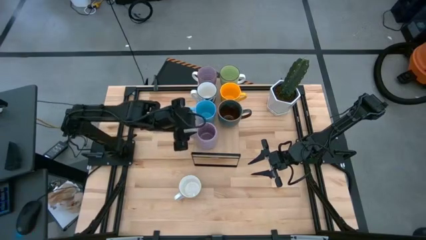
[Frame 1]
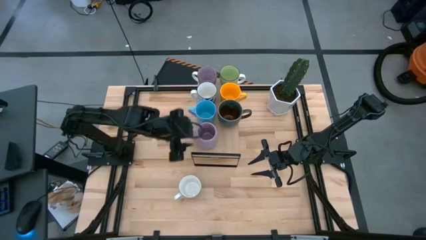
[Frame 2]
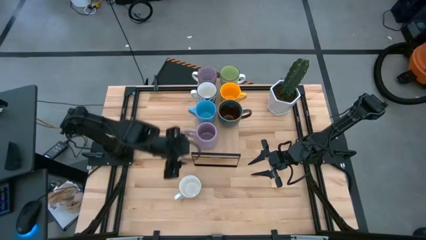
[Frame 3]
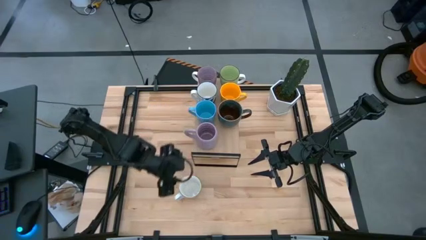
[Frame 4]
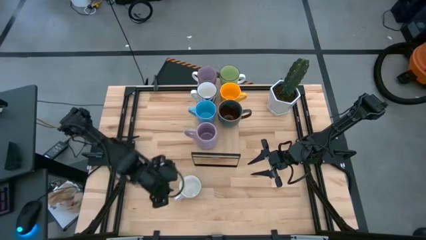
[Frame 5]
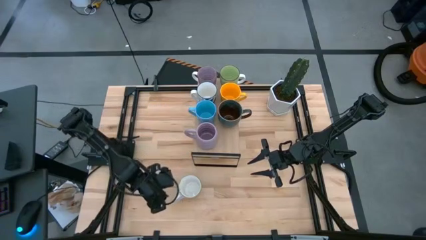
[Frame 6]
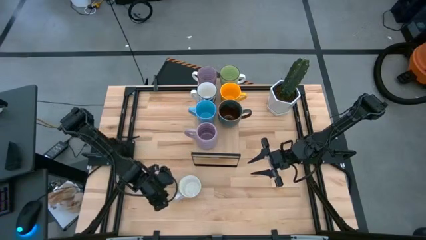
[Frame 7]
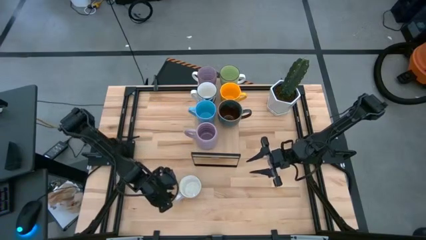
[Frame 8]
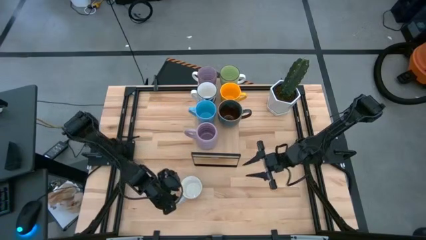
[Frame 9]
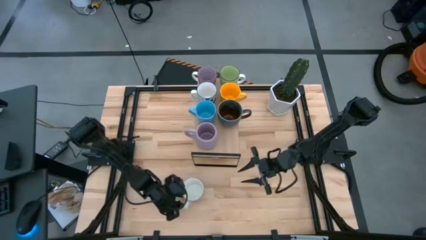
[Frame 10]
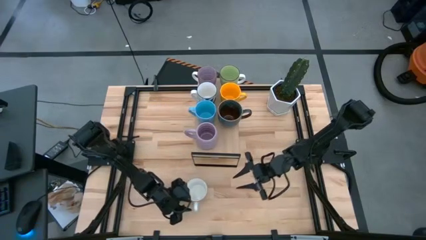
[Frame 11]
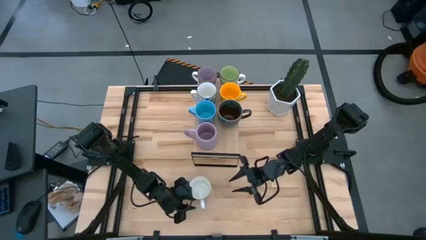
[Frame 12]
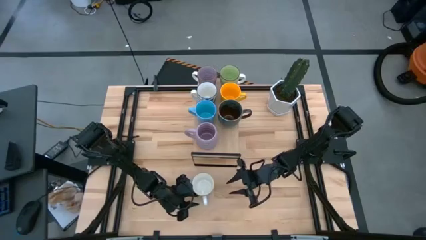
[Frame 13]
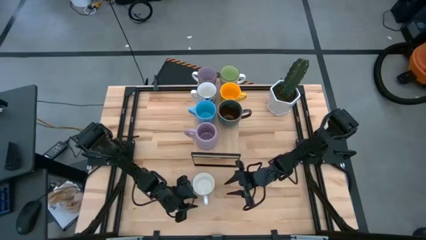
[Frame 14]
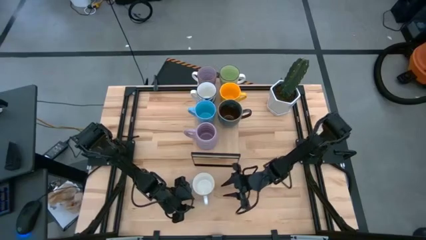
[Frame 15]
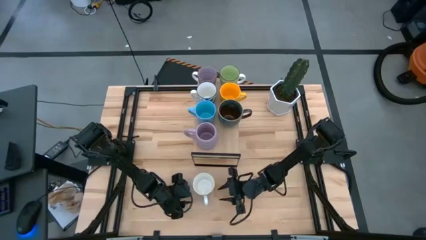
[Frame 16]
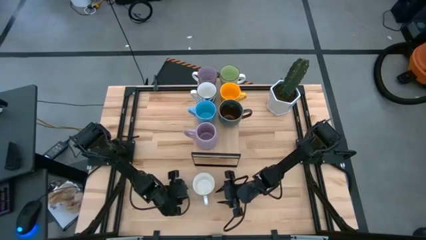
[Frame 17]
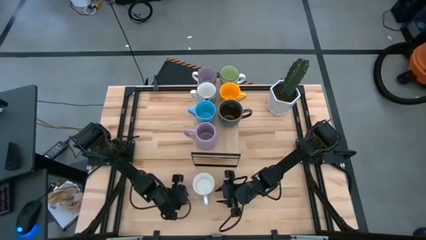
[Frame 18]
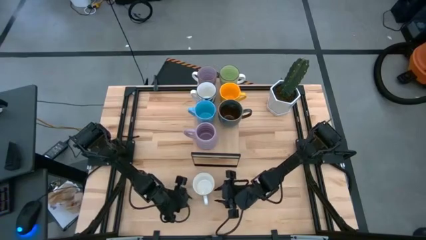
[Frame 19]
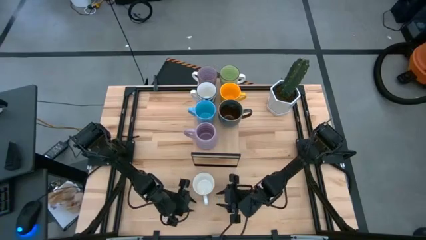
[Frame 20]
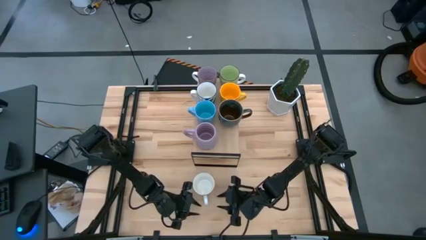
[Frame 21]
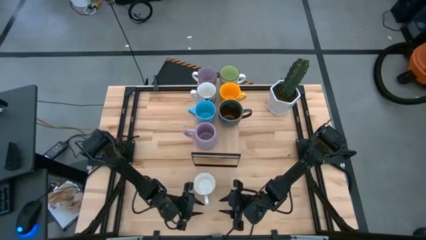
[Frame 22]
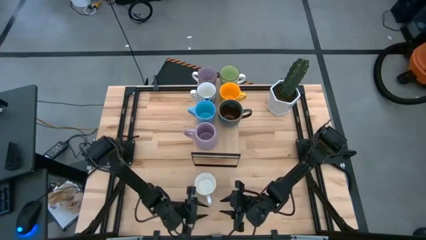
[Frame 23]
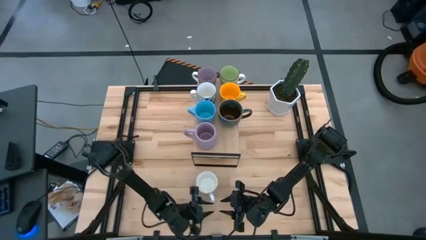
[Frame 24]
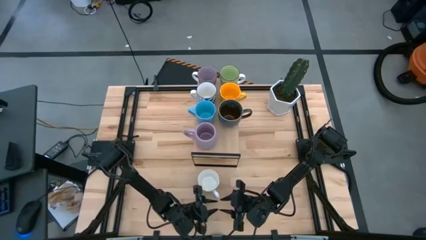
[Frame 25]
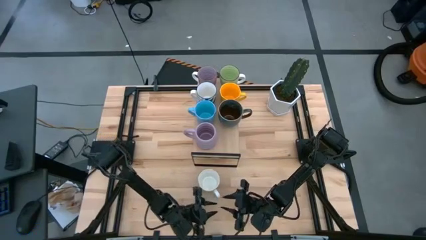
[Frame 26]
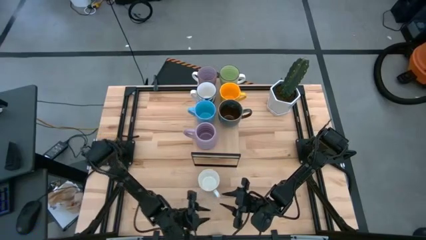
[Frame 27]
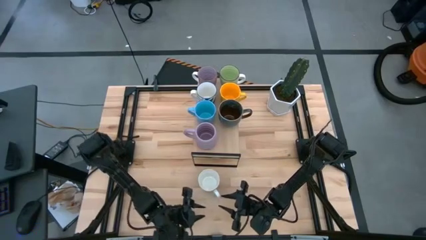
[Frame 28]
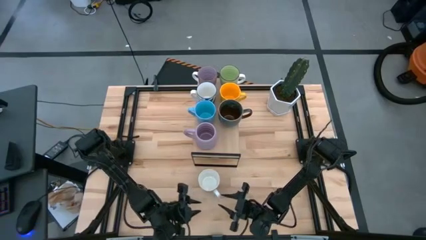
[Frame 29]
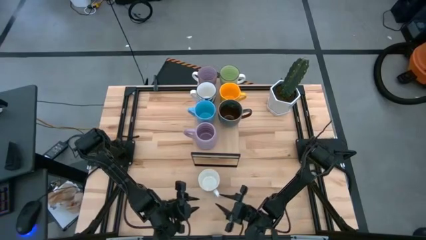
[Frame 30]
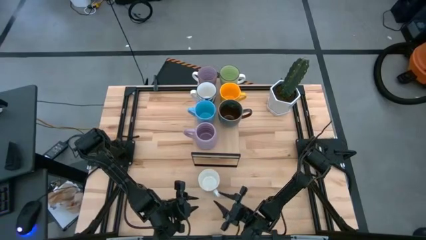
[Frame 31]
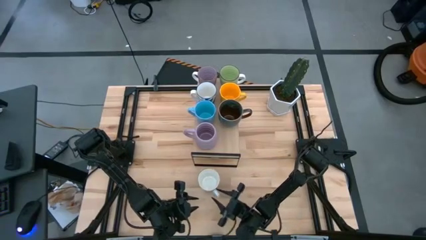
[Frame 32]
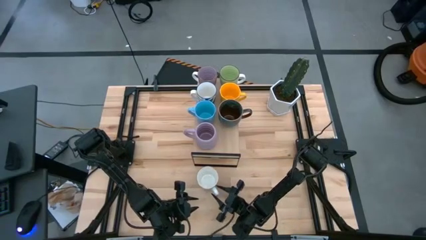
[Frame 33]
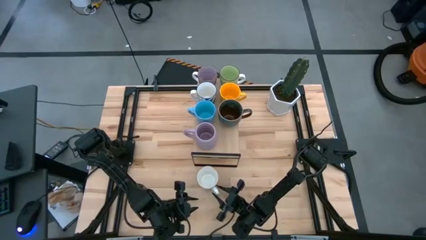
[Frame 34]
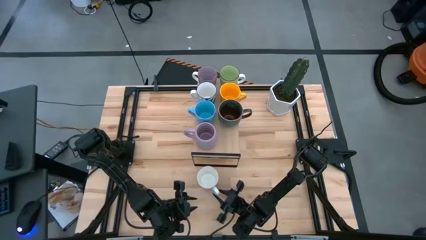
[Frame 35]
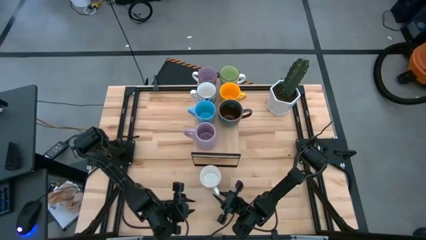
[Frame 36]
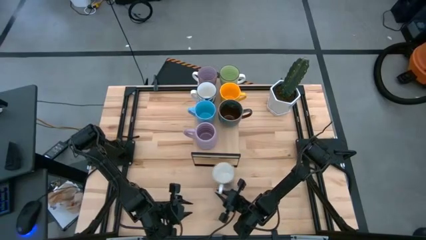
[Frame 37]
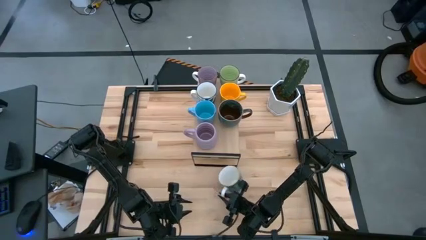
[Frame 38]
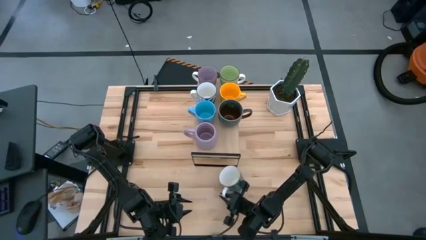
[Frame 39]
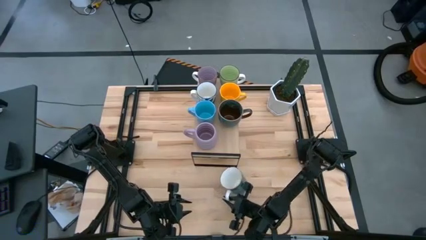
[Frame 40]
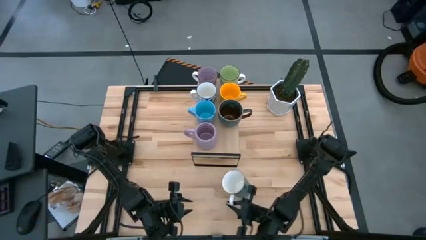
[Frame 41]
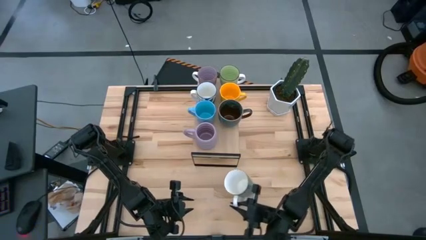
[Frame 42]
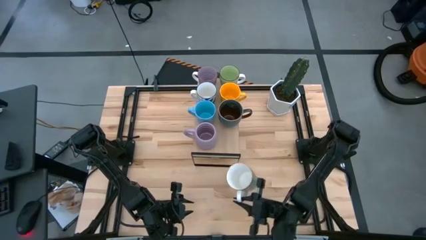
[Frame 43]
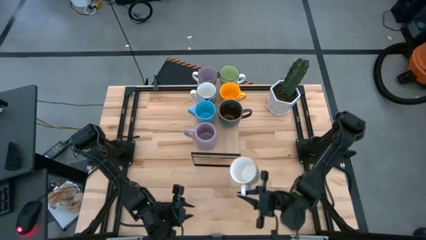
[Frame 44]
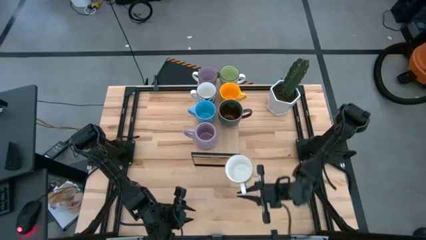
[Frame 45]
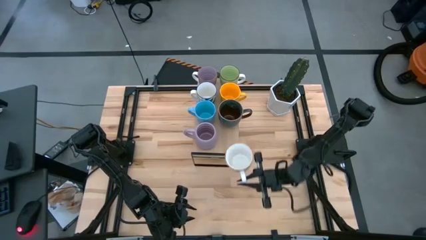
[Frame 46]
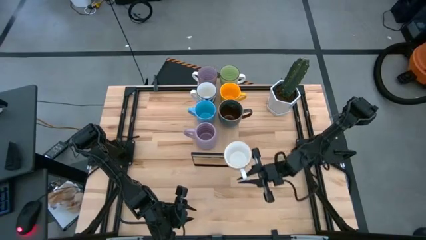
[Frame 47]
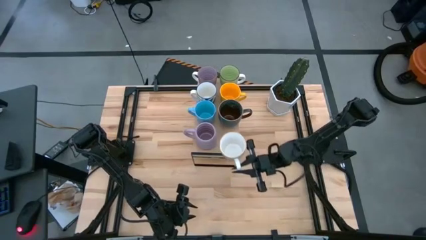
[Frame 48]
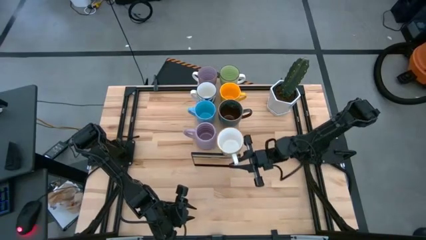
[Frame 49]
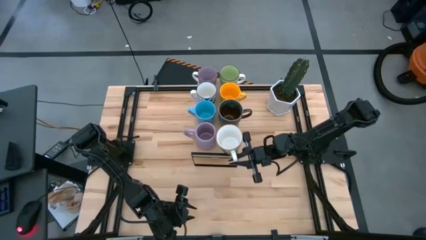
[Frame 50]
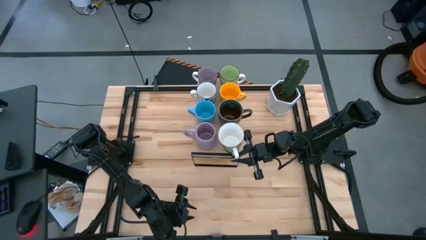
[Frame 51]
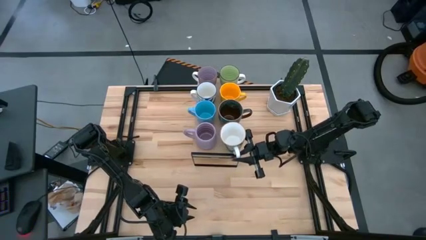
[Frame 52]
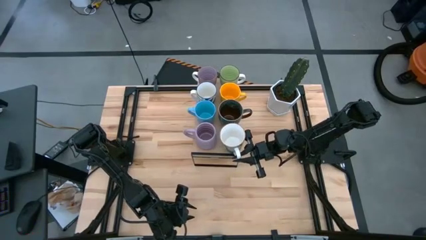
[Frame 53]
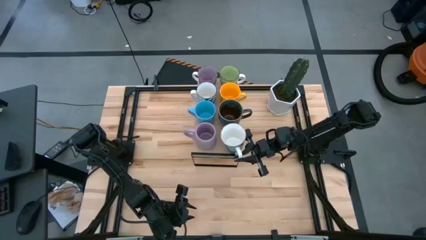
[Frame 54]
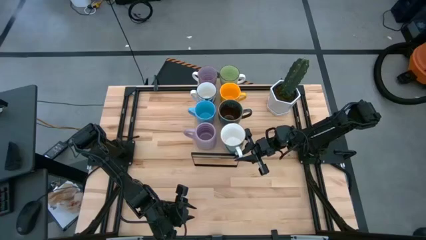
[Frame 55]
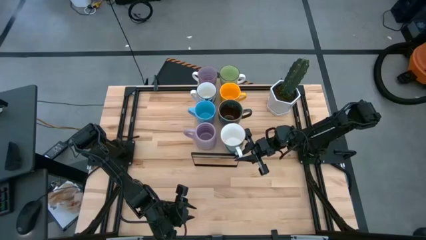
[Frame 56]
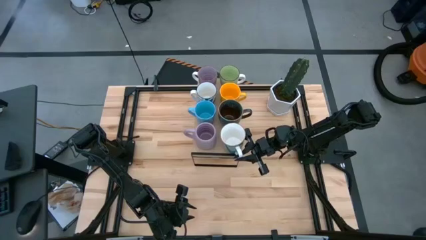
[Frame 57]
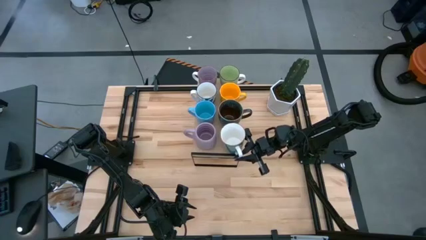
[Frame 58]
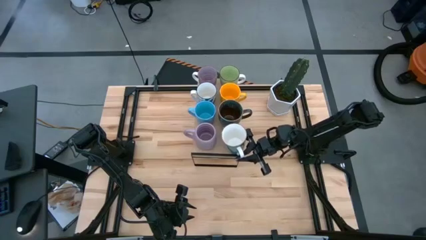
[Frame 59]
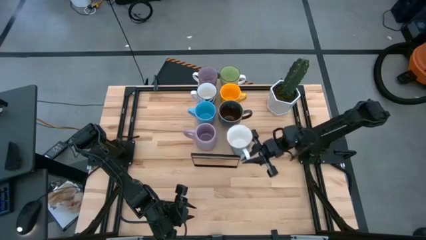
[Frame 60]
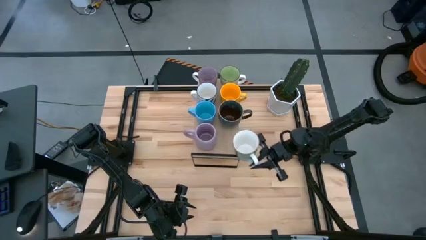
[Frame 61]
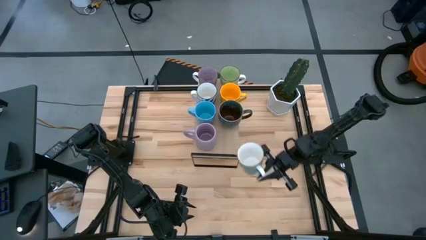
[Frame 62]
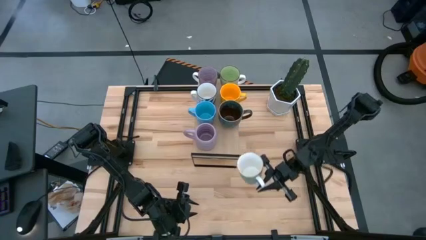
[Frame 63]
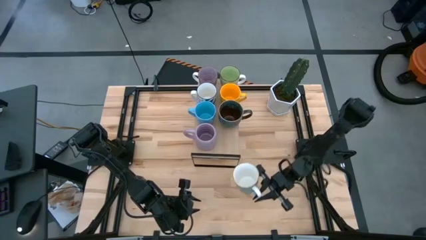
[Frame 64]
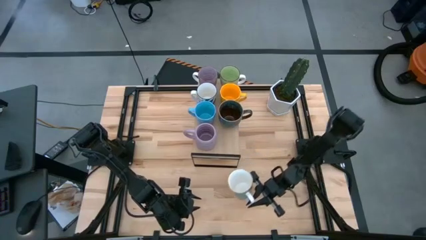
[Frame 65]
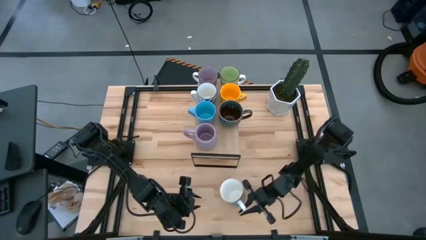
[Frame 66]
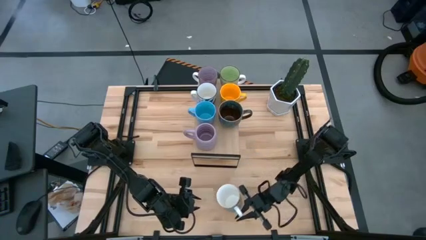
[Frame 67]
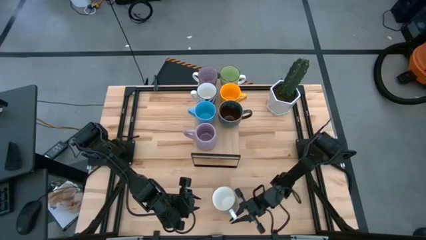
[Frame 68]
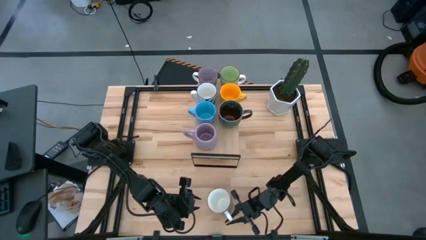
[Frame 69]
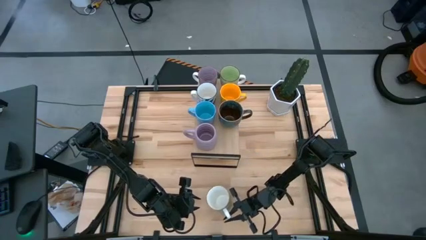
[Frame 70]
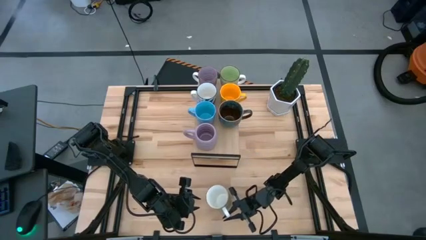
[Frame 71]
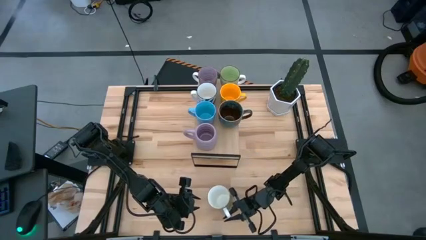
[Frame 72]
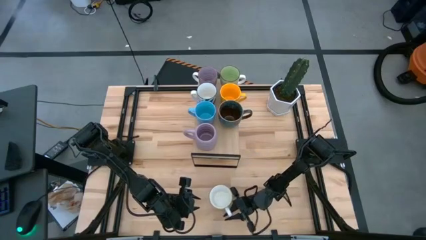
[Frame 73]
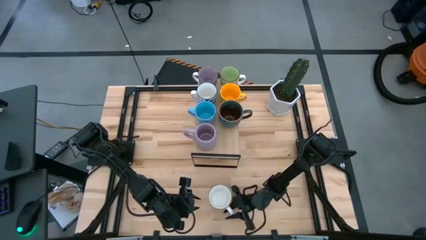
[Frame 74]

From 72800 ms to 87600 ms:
Task: Place coffee mugs
Put the light green mug on the shelf

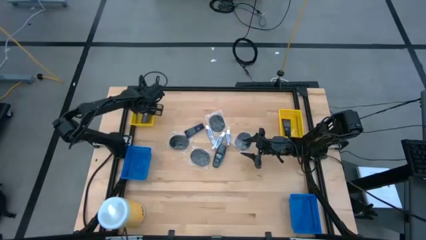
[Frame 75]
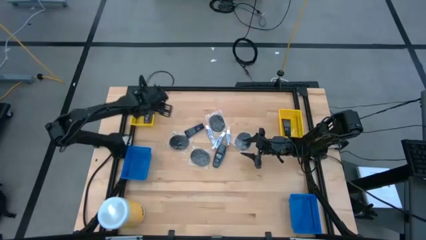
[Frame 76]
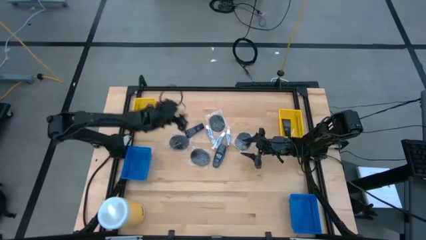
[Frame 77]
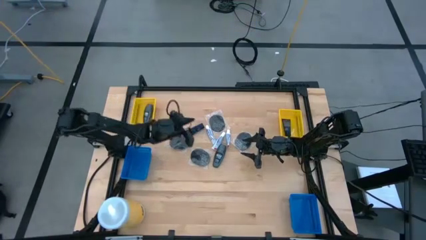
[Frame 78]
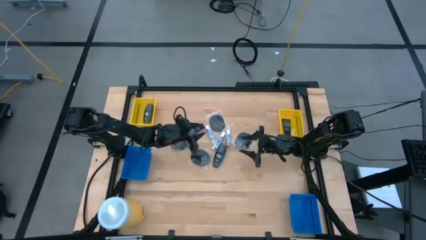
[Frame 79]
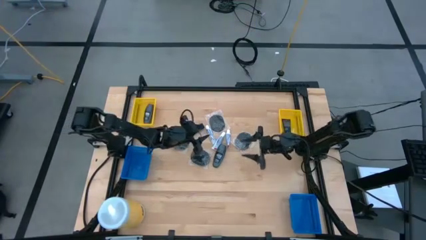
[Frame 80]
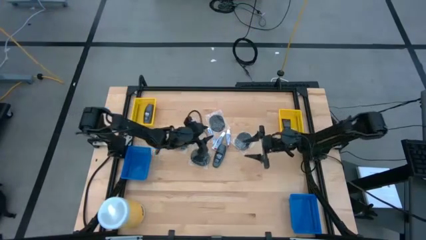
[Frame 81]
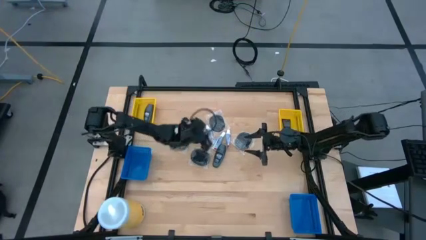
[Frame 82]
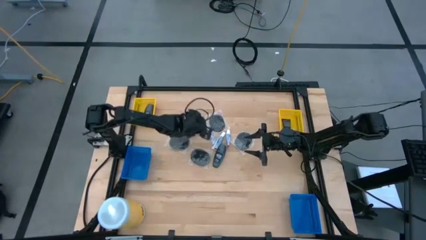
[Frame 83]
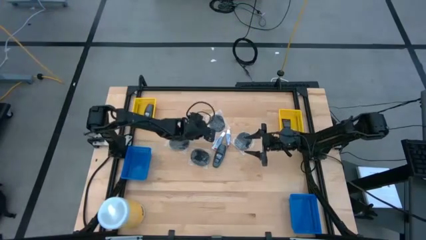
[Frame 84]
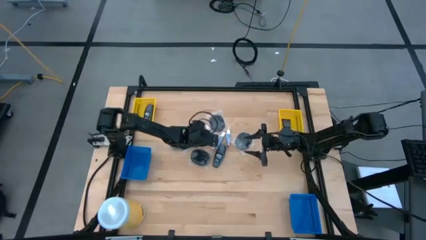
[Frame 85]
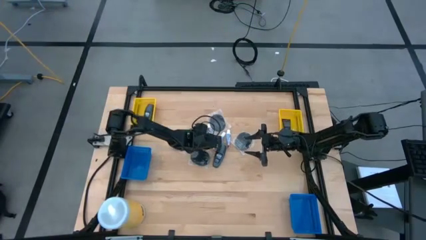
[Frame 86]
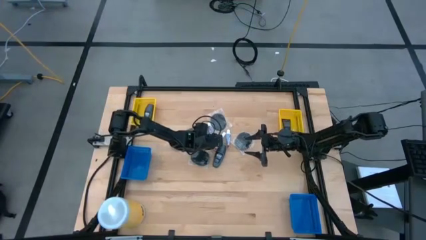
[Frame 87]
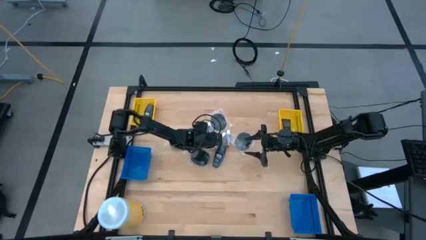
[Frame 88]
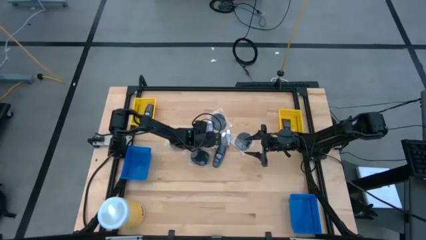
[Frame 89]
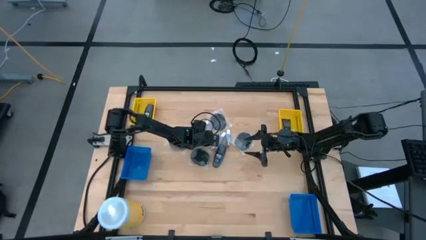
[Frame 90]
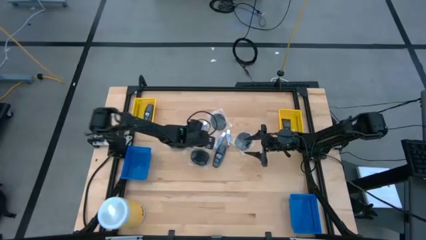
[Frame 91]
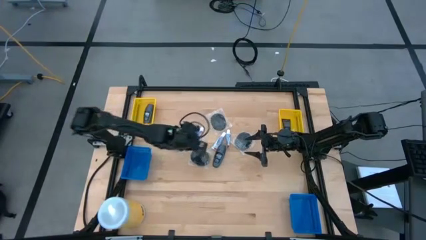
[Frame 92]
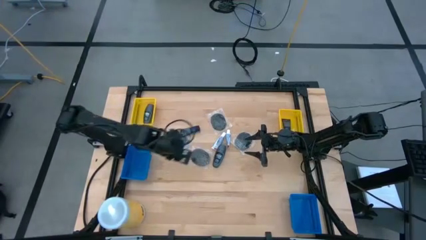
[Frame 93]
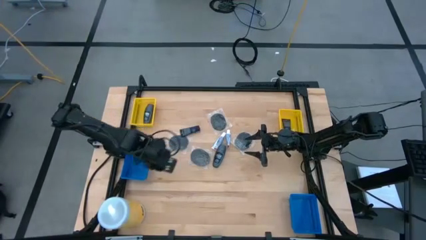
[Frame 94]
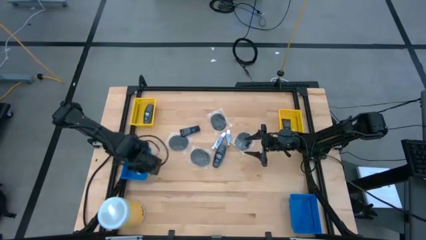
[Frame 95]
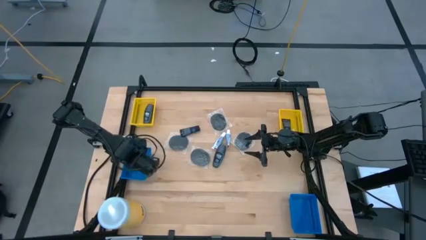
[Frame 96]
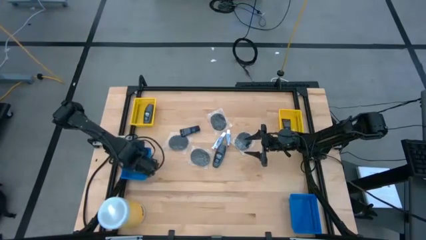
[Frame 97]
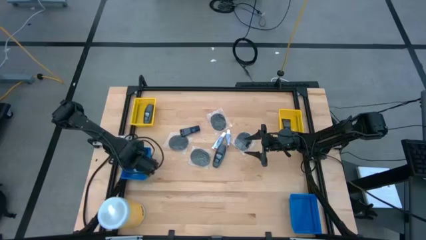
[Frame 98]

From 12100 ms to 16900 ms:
Task: Pick & Place Travel size toiletries
Put the white toothpaste into the left blue basket
